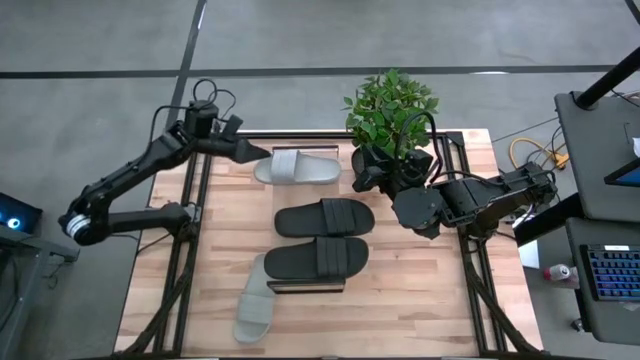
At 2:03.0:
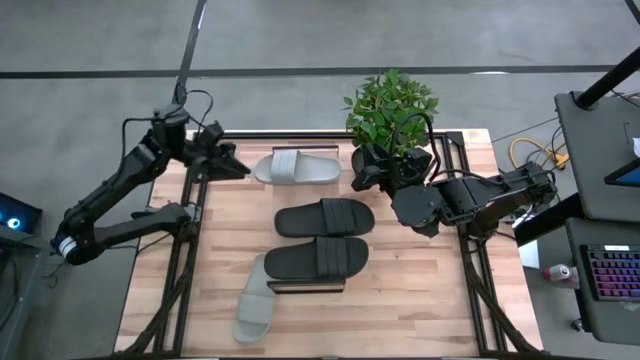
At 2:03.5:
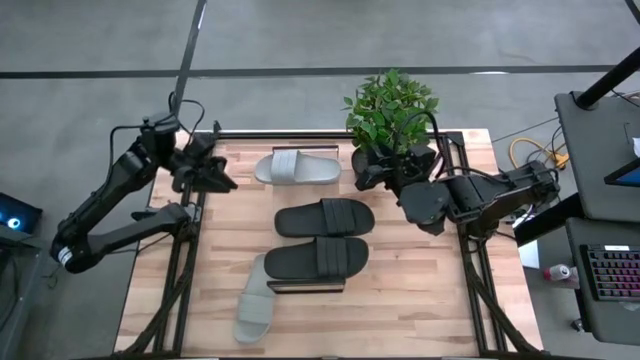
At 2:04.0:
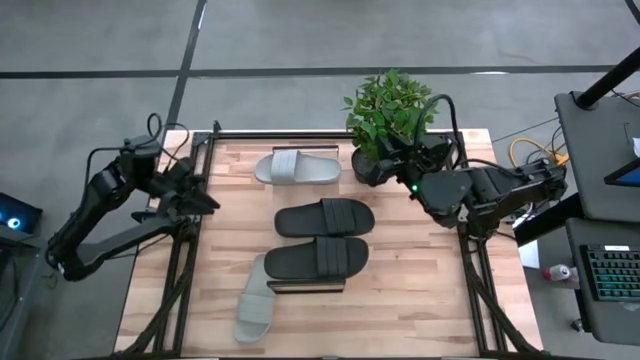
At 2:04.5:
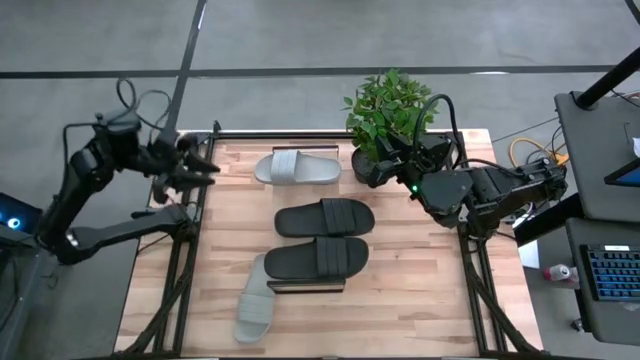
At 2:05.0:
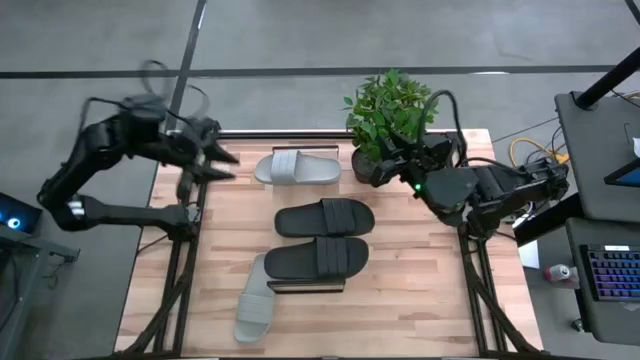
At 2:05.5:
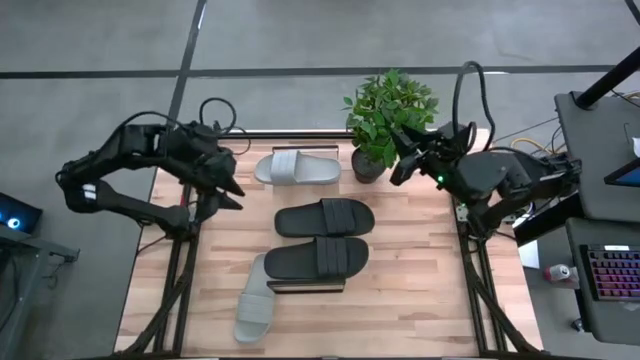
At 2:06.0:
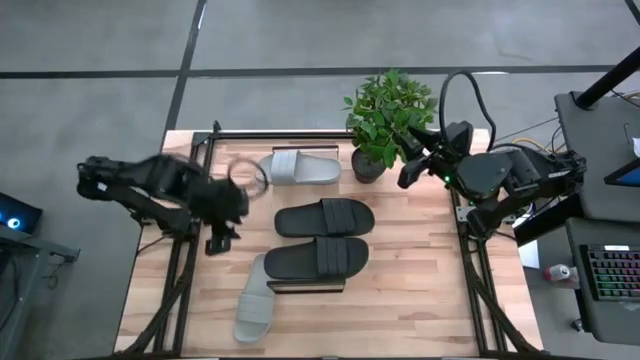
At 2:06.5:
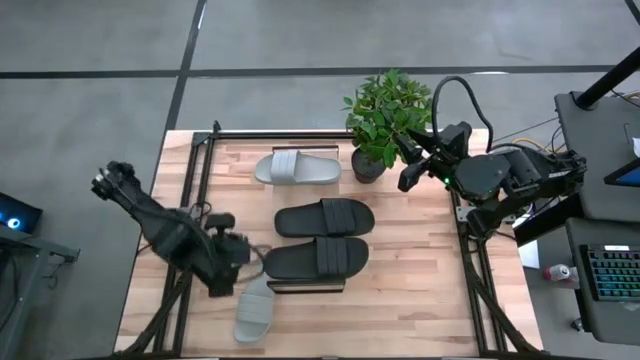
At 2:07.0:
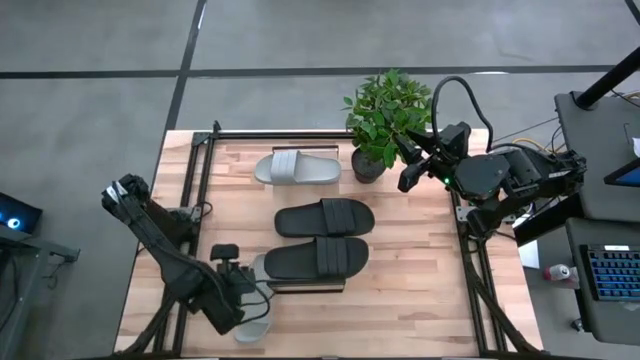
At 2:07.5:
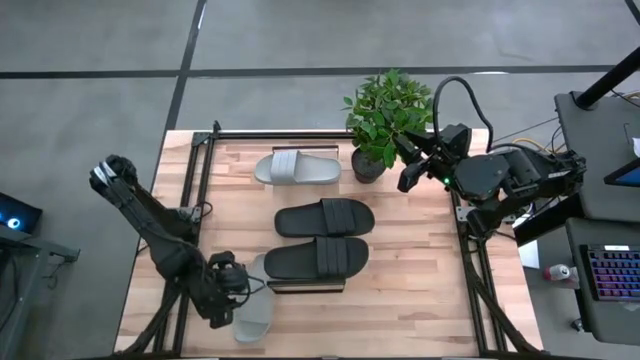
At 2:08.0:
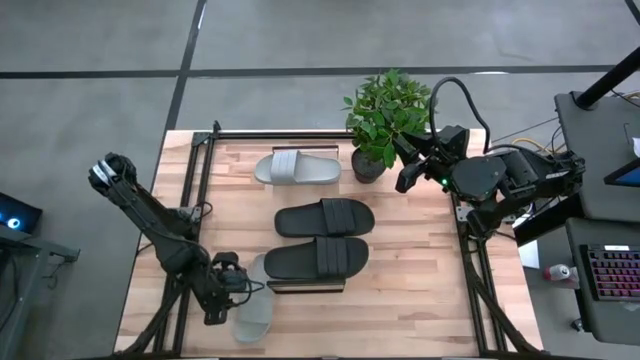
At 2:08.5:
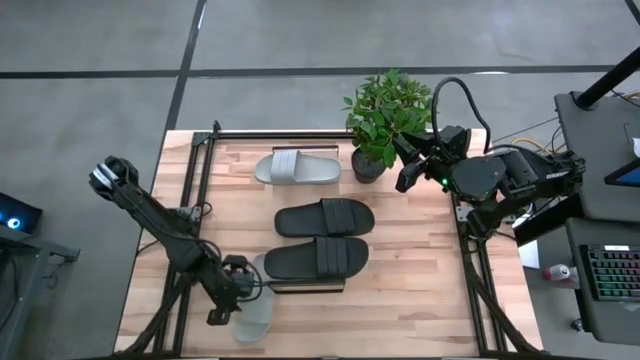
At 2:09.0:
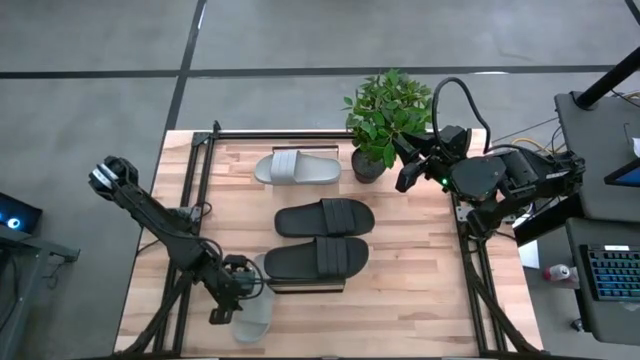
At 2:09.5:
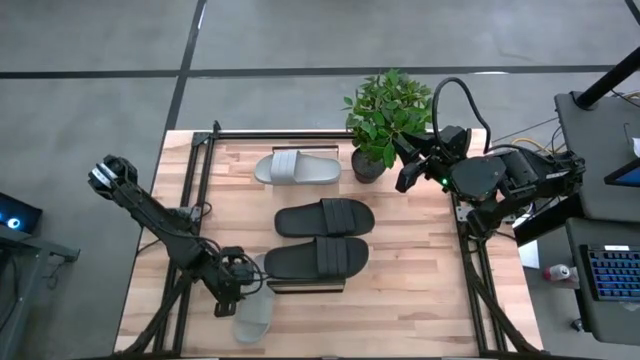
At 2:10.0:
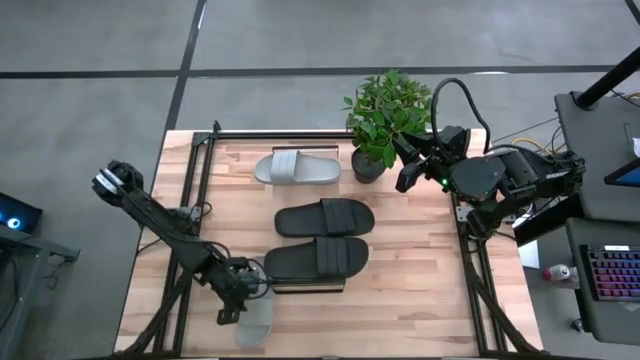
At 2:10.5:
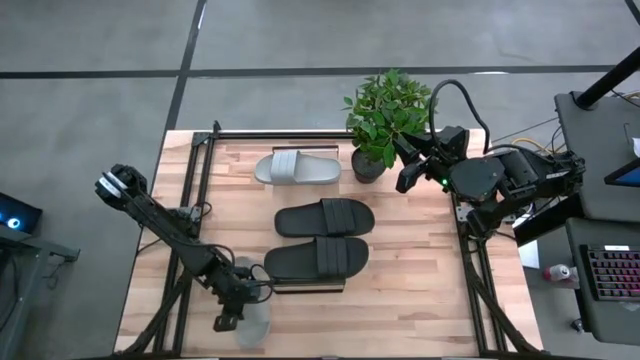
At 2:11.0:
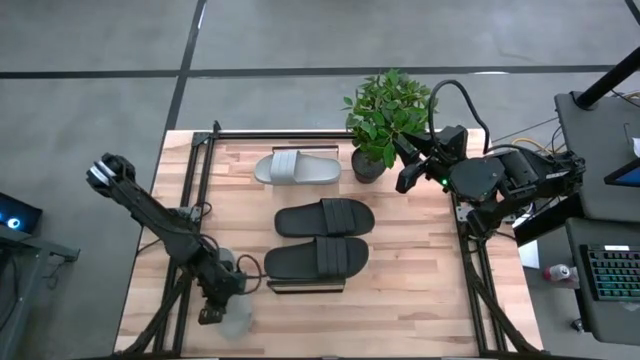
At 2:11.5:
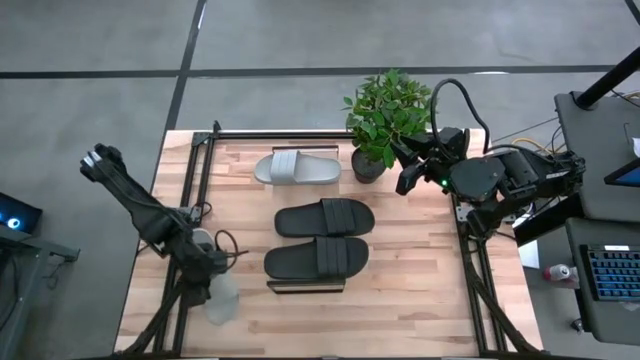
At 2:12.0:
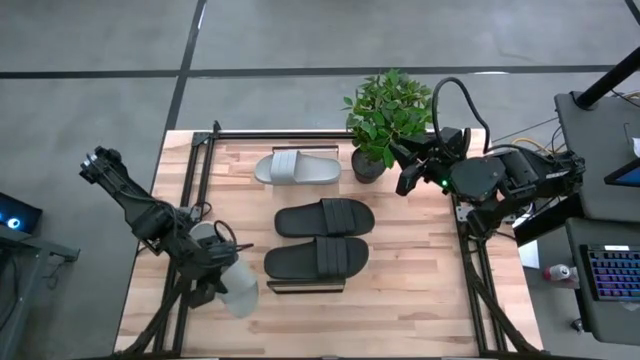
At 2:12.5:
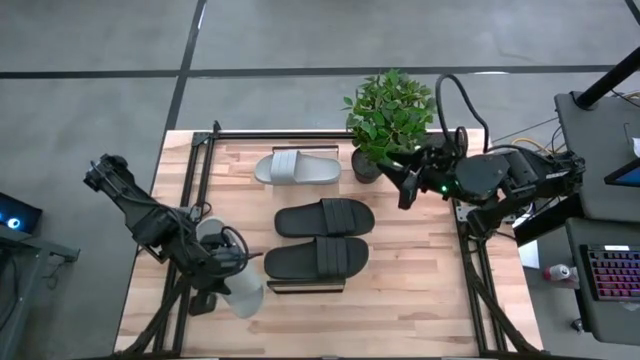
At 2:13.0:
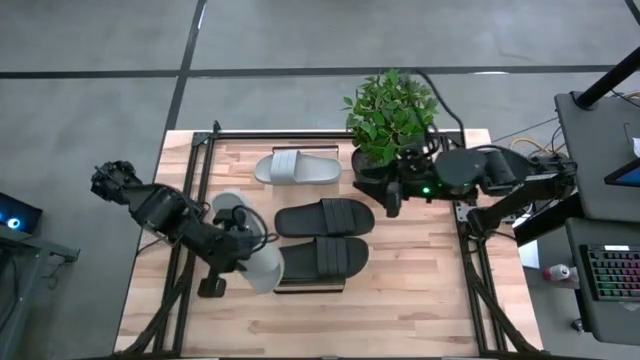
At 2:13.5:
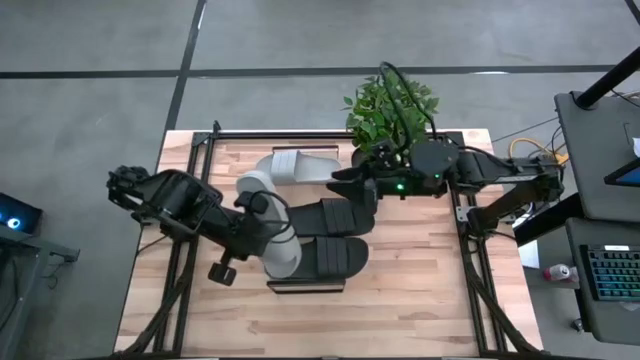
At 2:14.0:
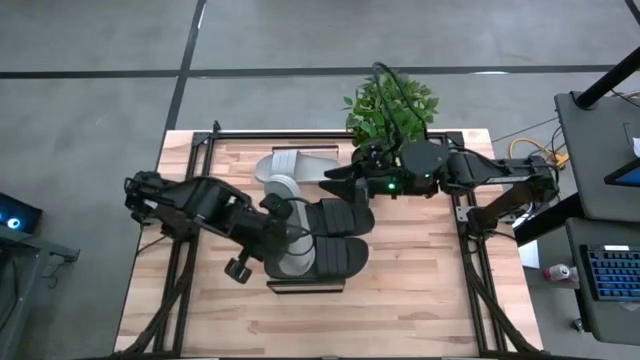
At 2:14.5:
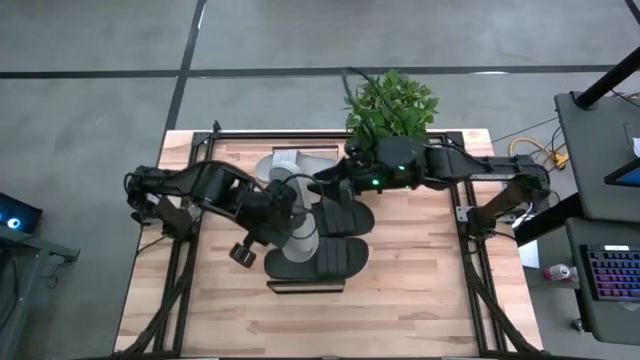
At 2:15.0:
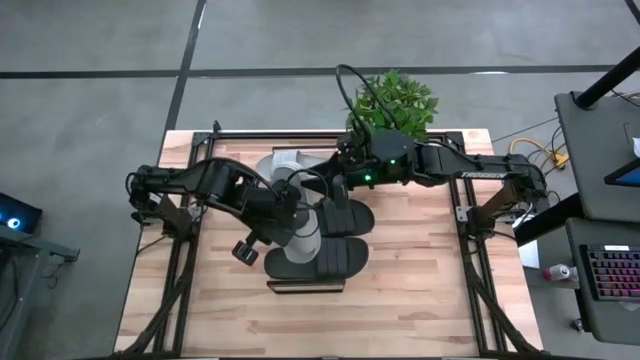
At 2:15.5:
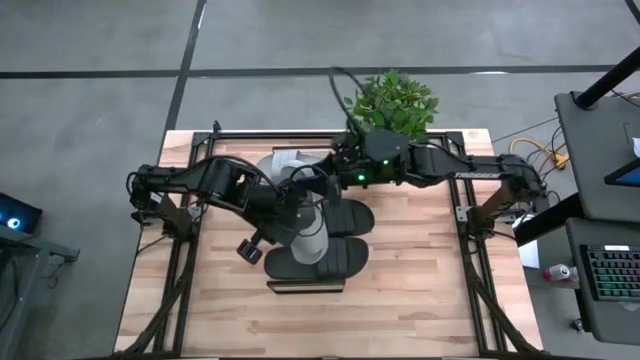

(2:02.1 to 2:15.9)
Task: Pick and place slides into the shelf
Put the gray slipper on the shelf

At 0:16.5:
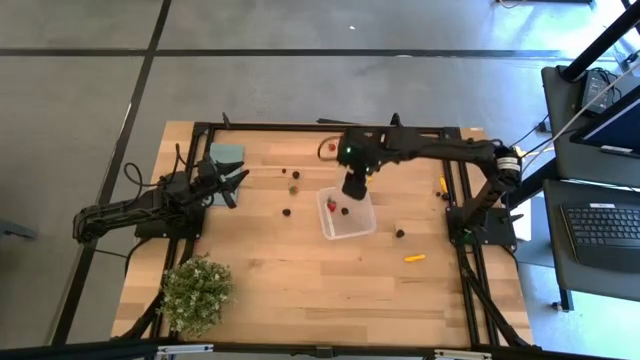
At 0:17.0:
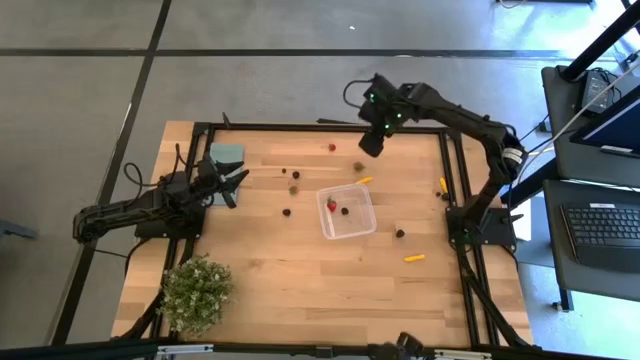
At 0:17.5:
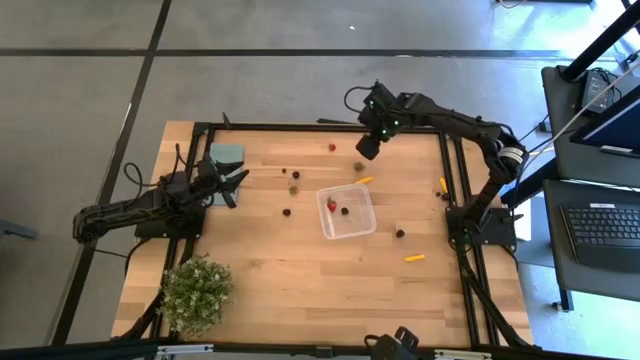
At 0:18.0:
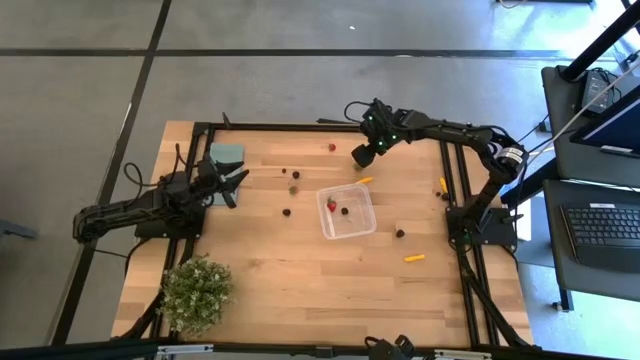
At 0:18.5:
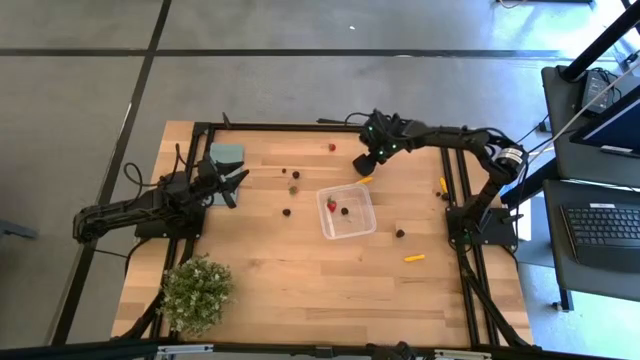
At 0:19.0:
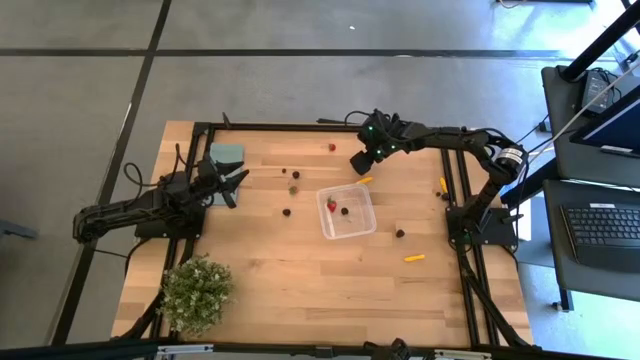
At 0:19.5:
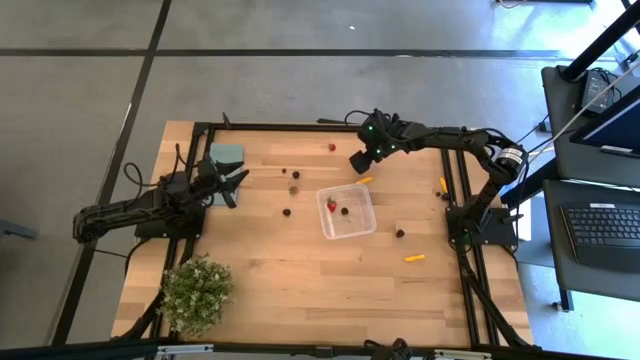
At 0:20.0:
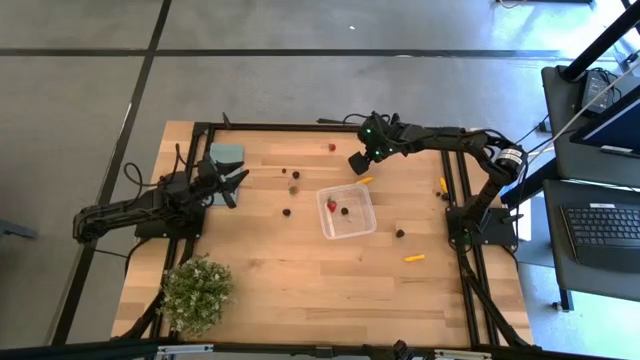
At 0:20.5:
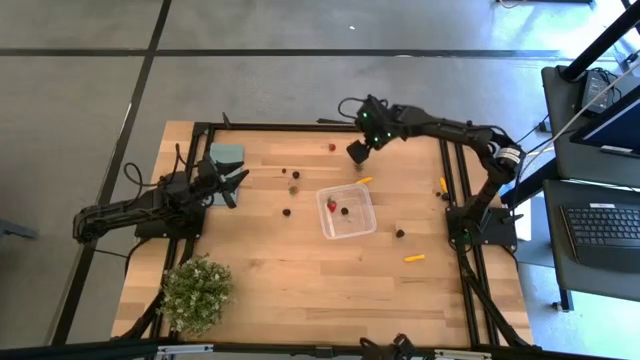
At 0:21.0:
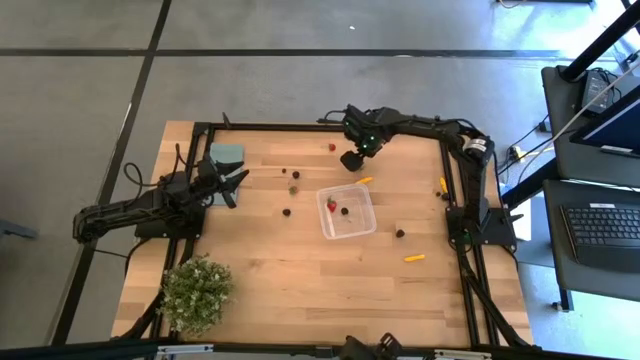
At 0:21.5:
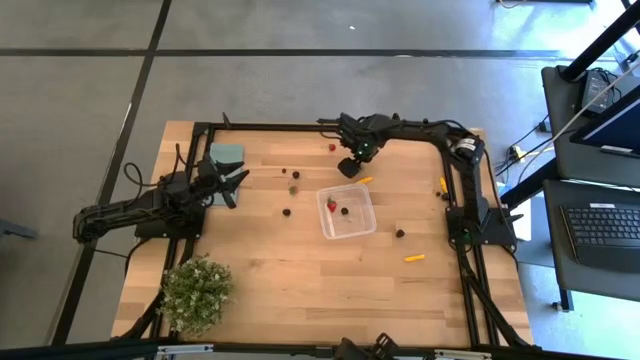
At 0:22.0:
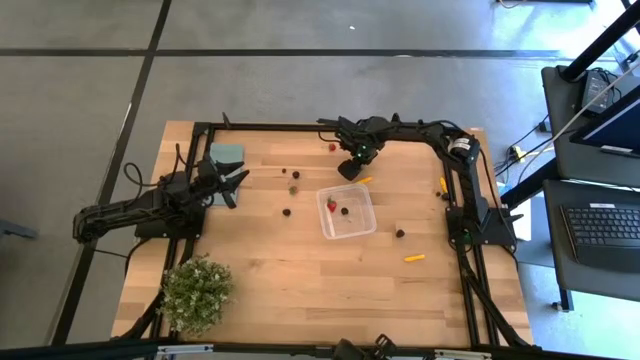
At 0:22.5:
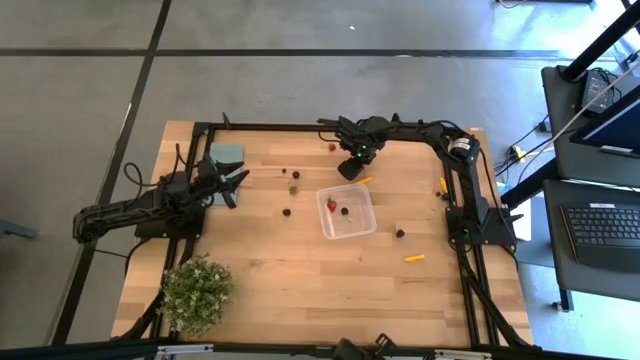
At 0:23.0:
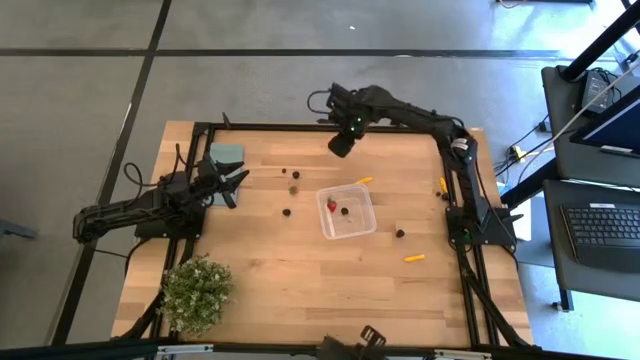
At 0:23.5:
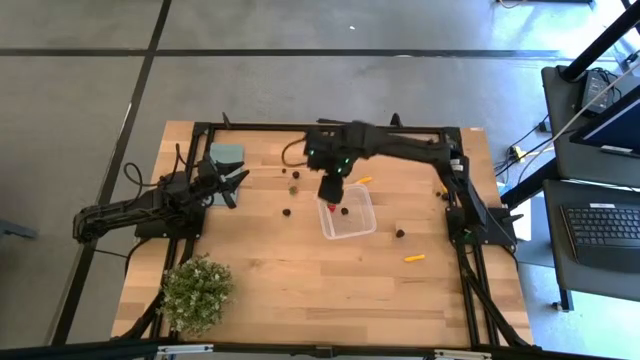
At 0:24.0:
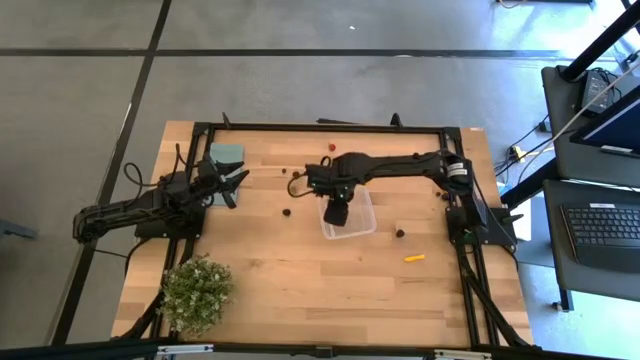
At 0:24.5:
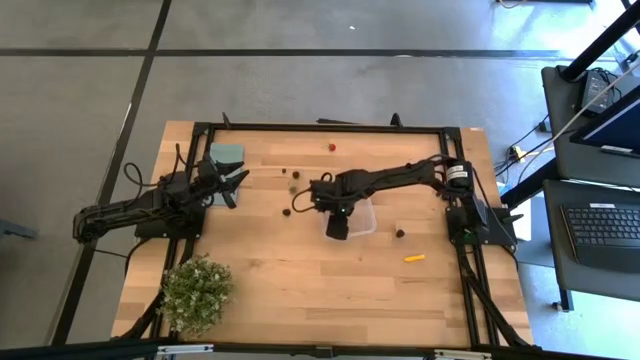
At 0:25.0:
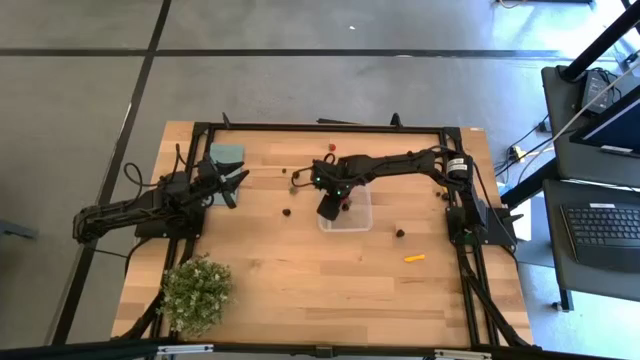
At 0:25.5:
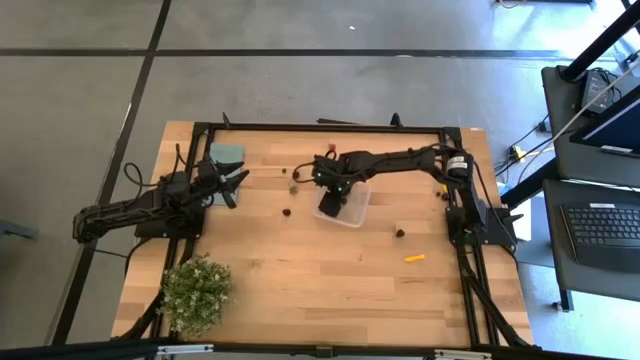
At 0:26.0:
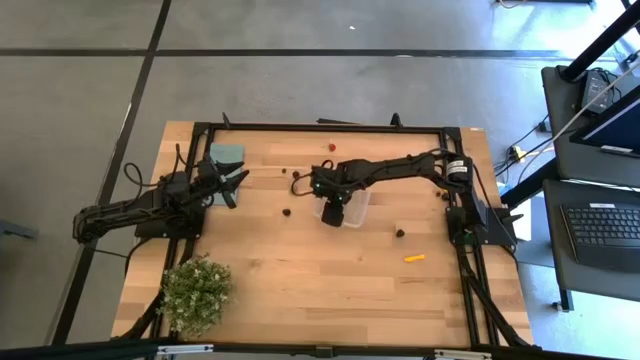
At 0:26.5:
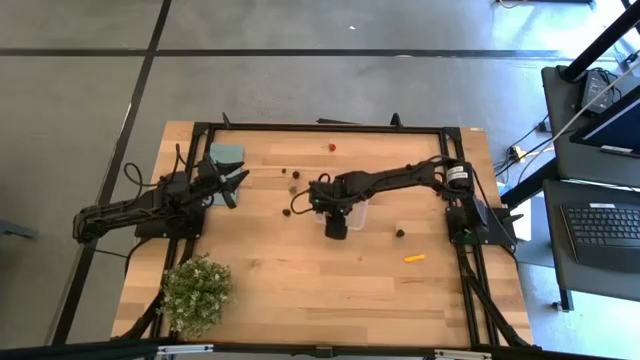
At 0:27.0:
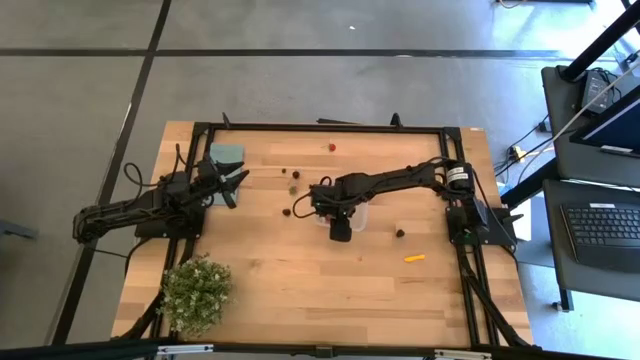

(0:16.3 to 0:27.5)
Task: Pick and placing Produce into tupperware
Put the top right strawberry into the transparent bin
